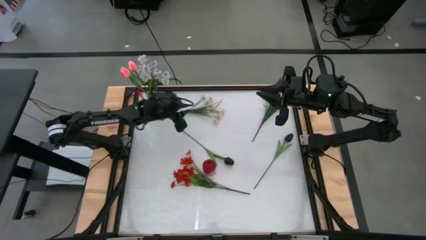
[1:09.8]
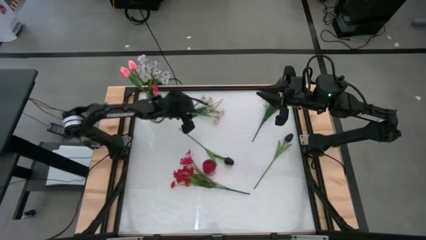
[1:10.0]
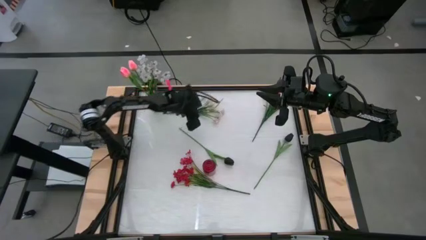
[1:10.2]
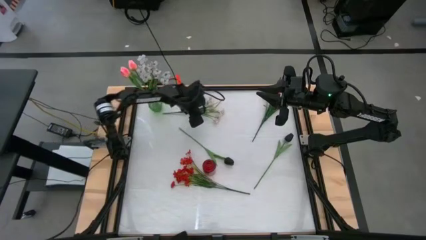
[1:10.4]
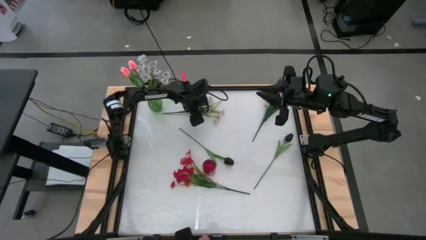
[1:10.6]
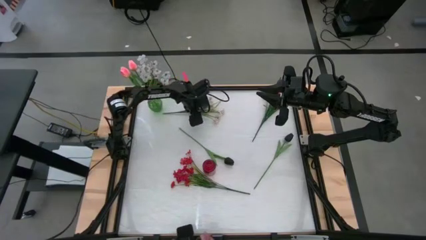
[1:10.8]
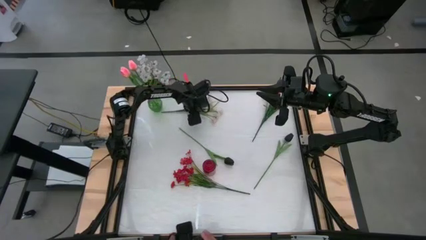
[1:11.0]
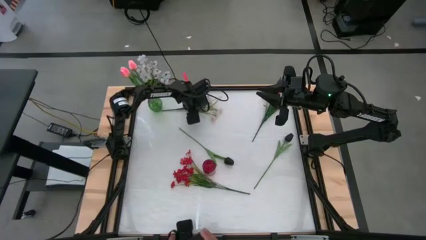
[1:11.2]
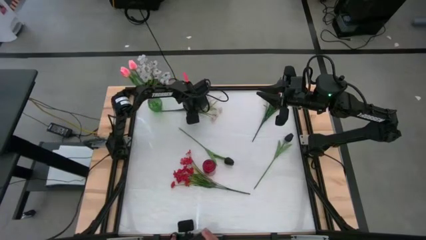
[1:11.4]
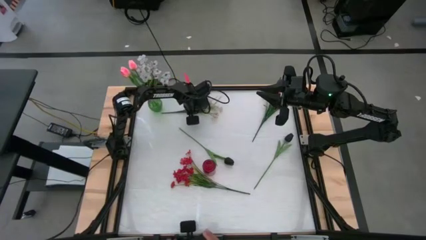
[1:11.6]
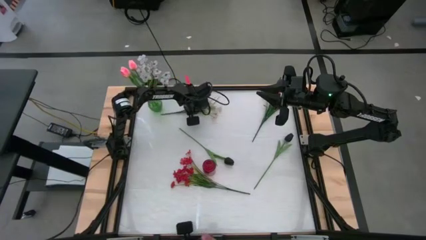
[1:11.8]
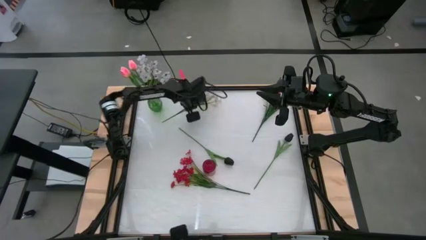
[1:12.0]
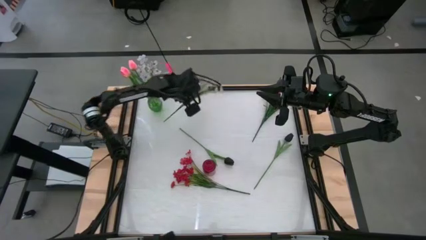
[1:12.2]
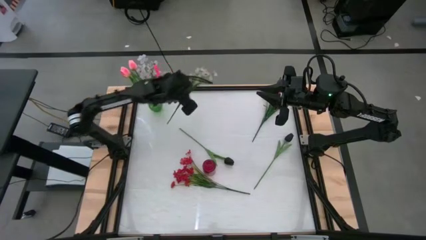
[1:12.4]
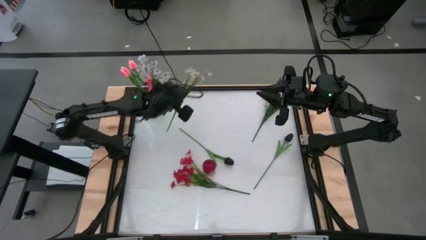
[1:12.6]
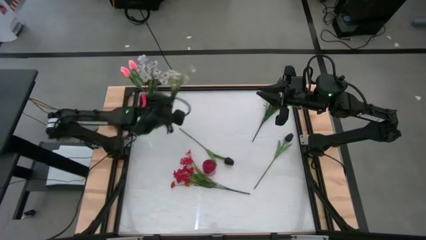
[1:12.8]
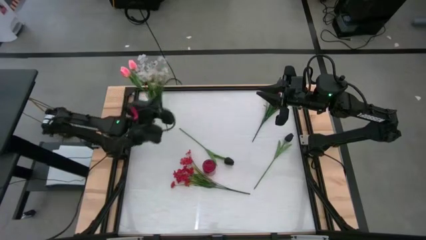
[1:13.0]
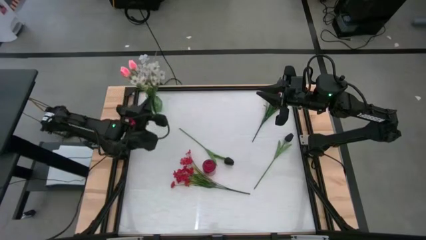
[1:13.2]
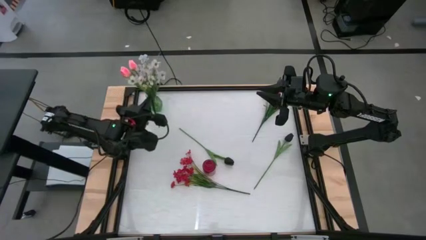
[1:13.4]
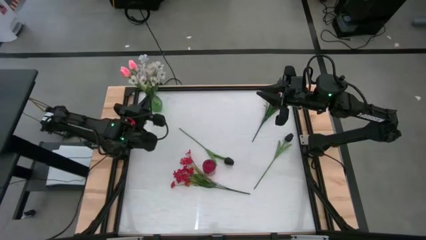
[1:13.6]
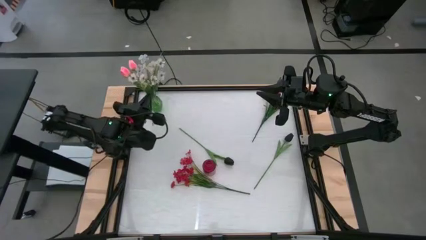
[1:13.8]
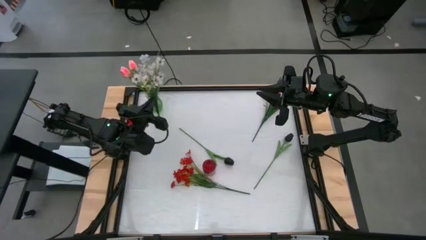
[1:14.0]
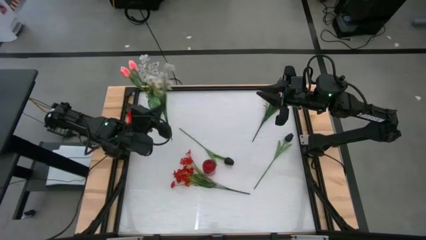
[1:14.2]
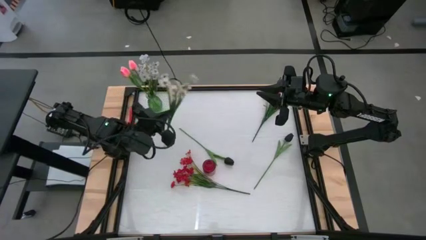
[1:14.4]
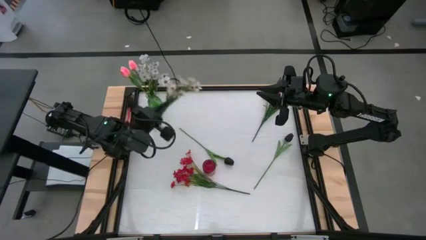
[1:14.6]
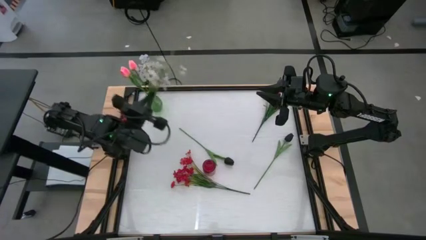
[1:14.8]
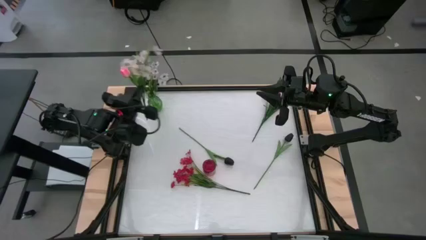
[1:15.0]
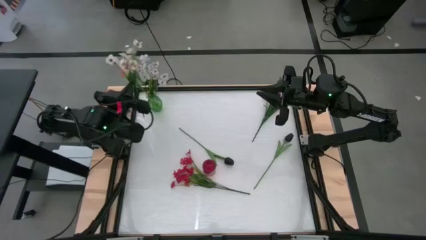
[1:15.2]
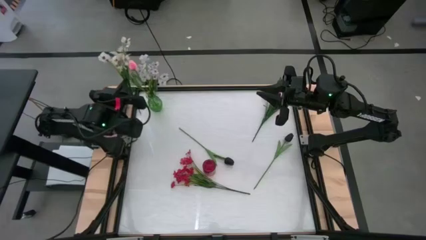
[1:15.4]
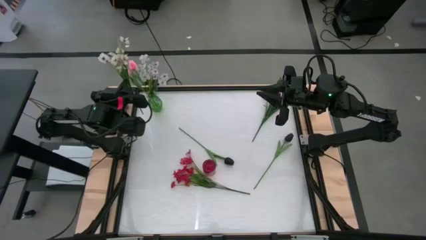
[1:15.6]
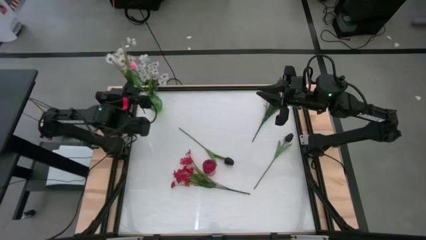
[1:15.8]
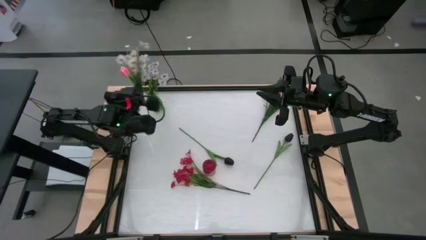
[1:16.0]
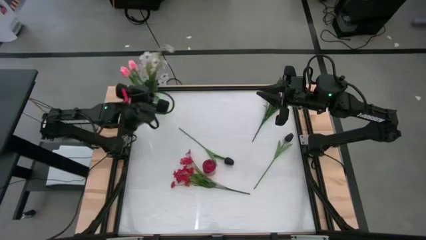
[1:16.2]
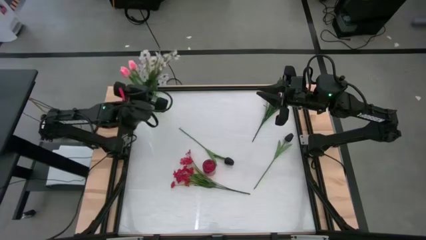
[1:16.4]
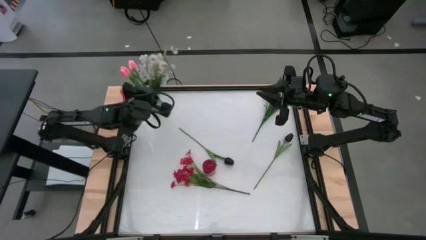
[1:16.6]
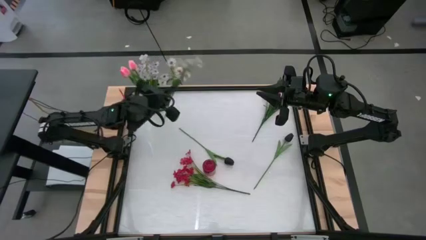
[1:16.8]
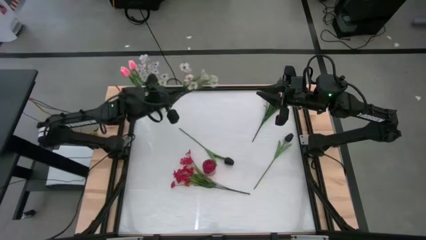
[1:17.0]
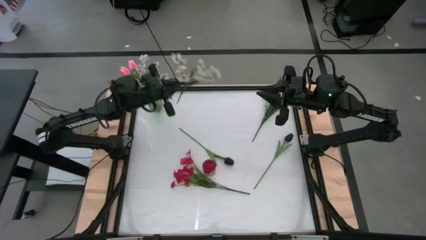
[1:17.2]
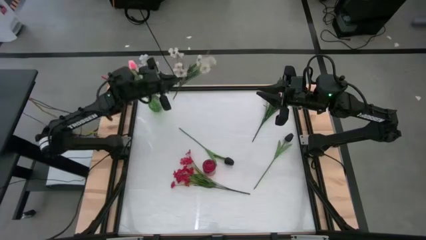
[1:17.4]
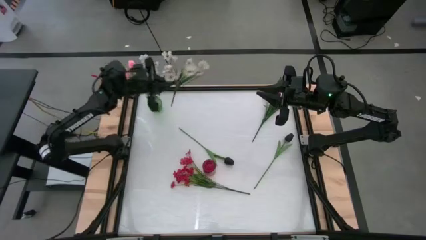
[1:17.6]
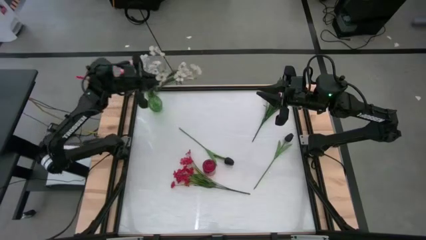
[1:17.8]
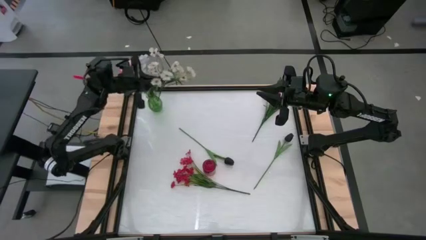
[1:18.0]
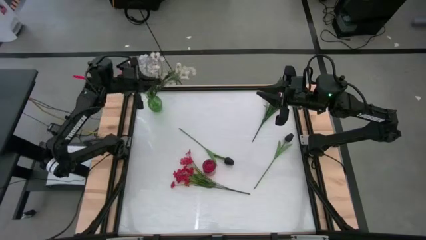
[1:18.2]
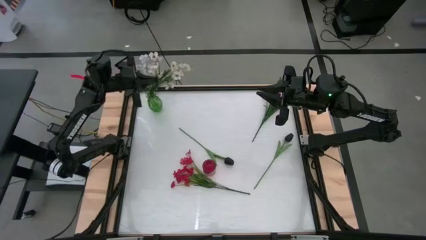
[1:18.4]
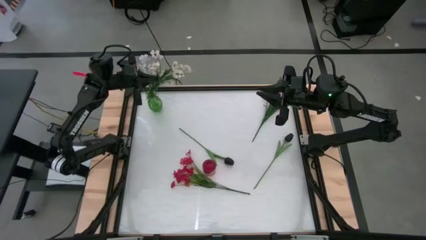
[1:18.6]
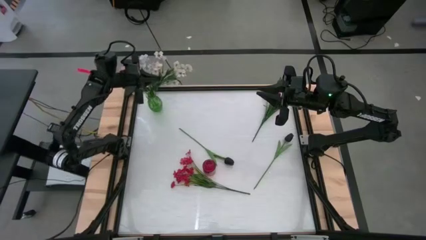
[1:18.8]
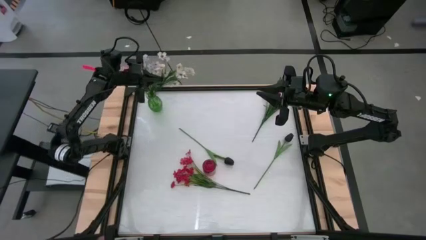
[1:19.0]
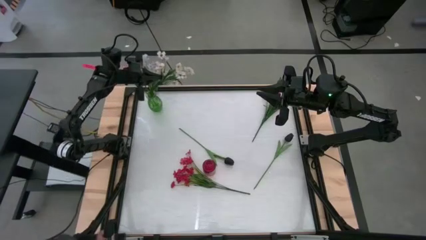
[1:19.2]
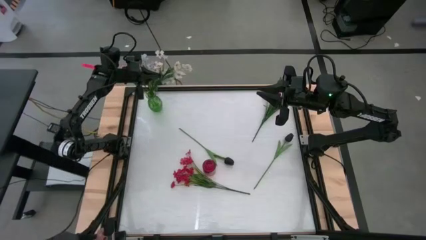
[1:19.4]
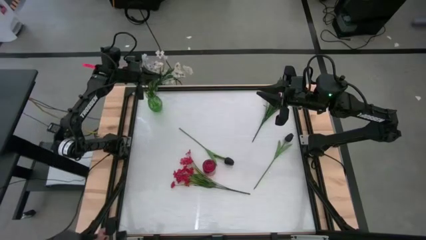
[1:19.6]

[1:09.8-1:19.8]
Task: Sort flowers into vase by color
Put the white flowers into the green flower vase

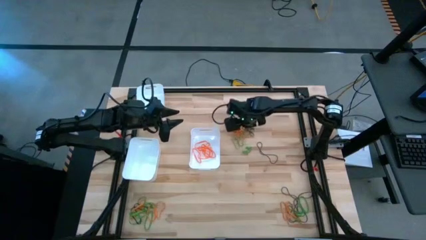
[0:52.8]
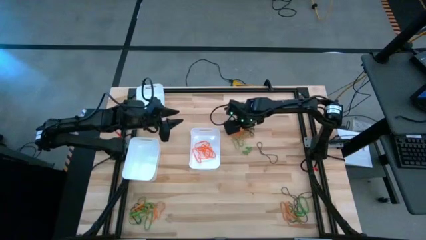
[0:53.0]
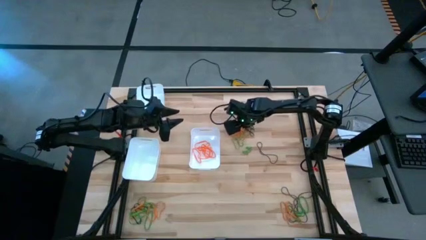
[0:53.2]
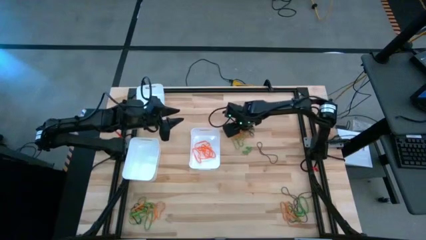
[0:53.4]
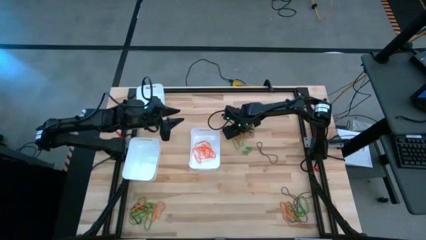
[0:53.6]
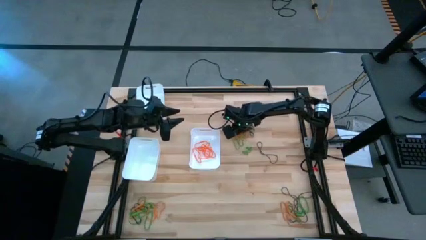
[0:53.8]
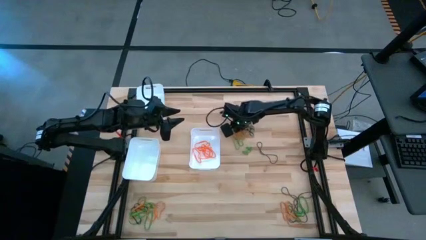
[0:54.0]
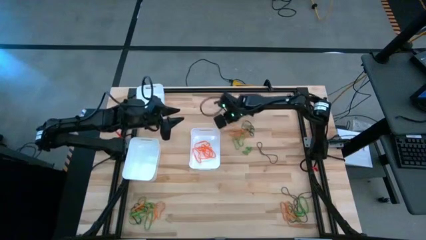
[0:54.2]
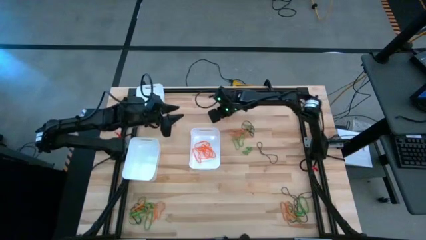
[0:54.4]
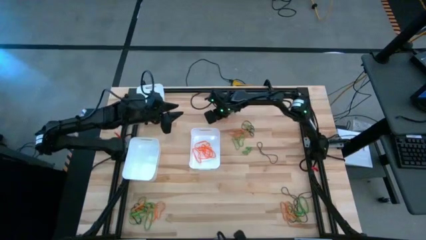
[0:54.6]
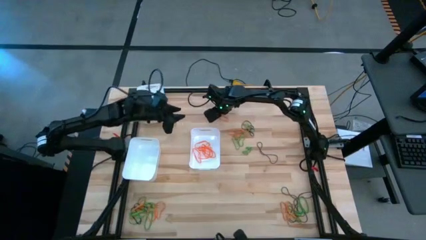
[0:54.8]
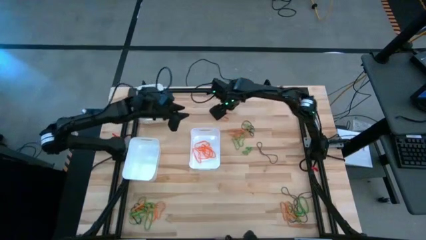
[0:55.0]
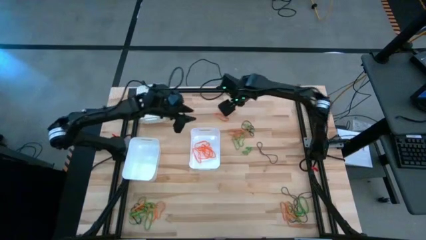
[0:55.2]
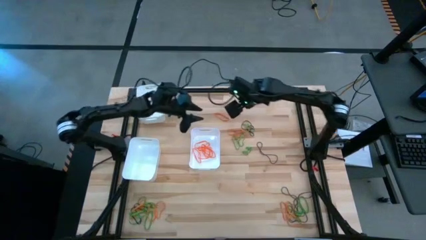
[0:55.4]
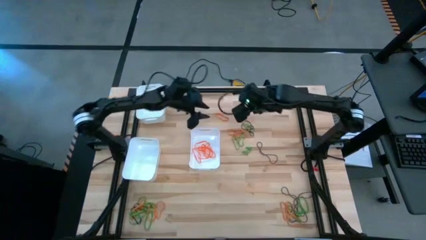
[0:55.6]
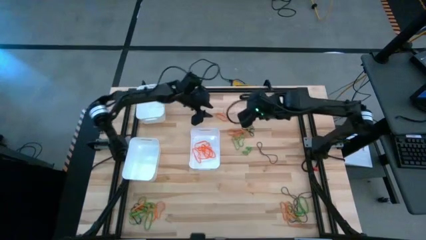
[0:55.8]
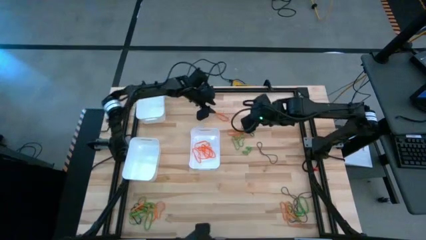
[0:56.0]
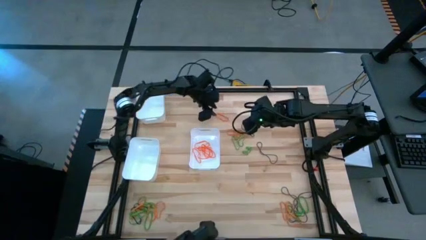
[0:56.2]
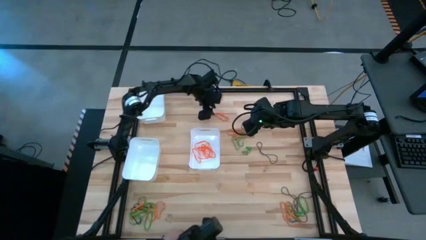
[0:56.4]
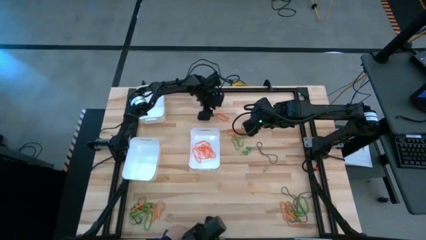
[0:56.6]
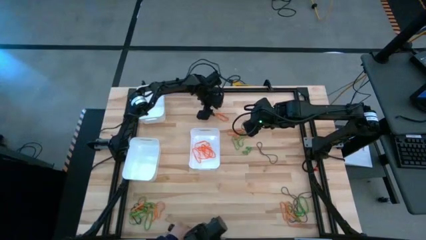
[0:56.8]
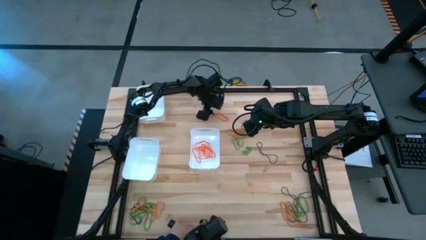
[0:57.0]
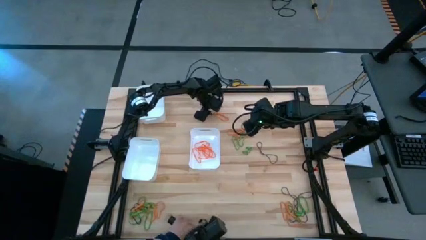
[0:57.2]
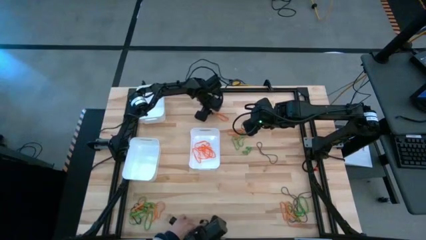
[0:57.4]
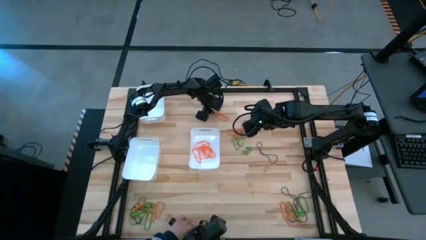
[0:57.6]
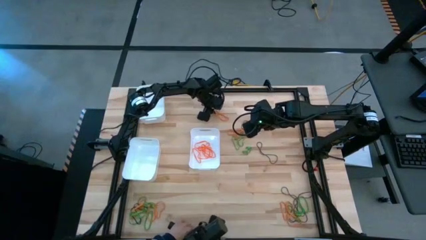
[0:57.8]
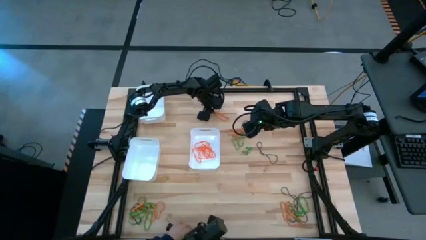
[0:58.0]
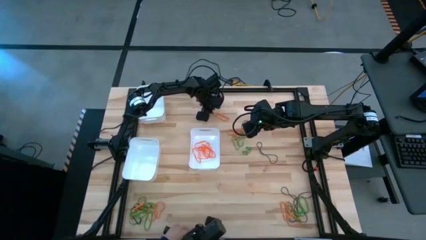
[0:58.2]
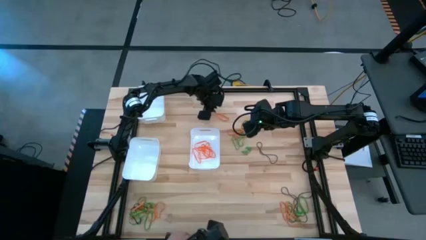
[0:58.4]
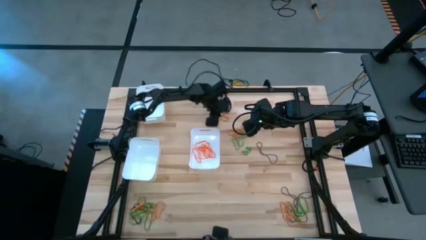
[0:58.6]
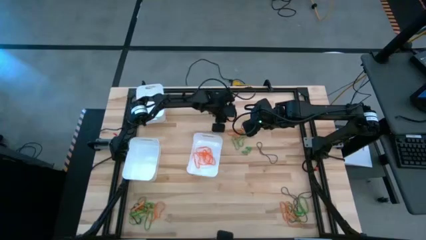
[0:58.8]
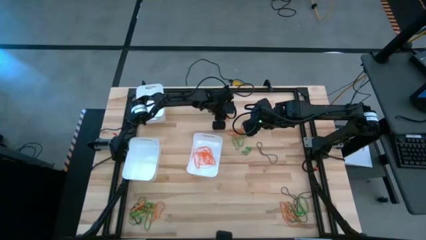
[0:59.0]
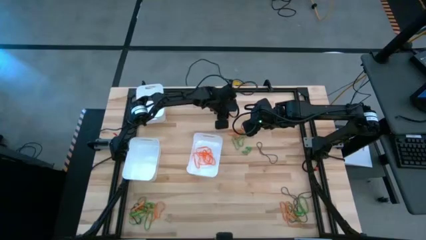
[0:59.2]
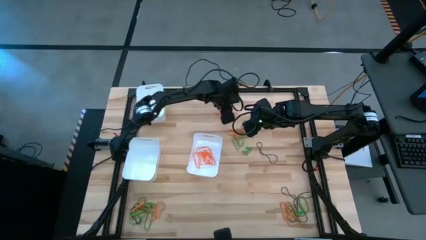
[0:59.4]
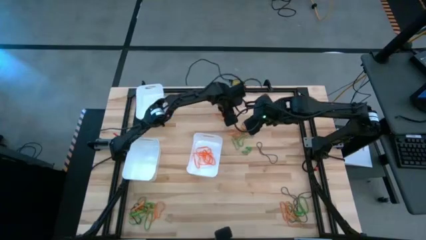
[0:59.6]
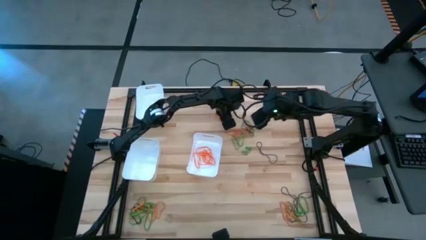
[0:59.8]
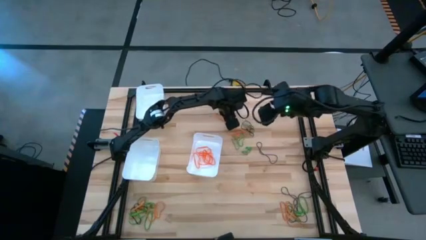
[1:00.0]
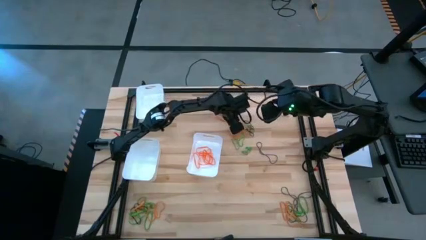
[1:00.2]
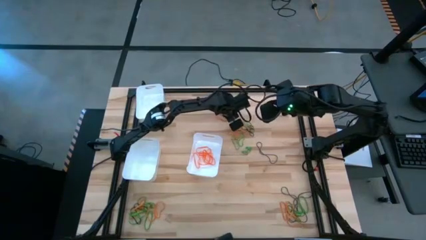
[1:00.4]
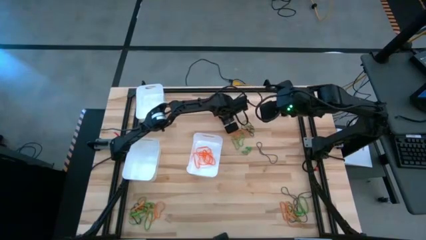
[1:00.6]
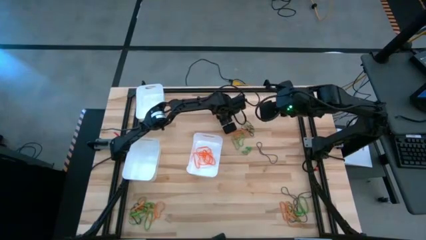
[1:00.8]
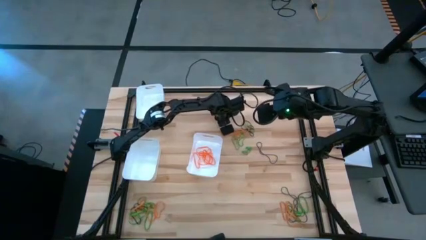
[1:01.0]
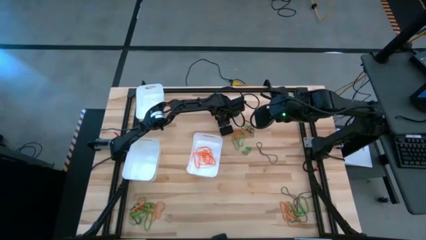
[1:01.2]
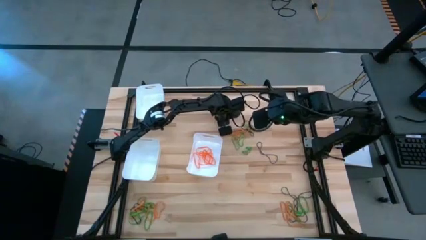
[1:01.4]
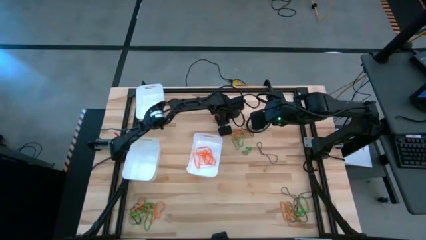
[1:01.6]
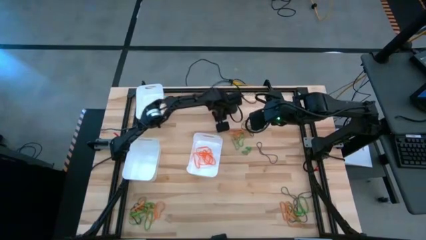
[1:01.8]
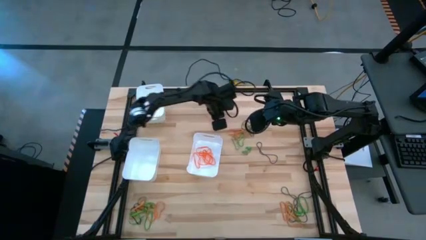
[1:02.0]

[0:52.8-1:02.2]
Task: Sort rubber bands into baskets
Put the orange rubber band into the bottom right white bin
